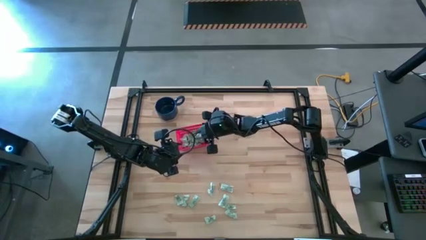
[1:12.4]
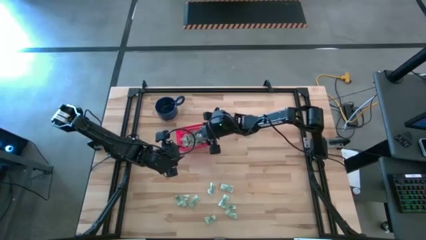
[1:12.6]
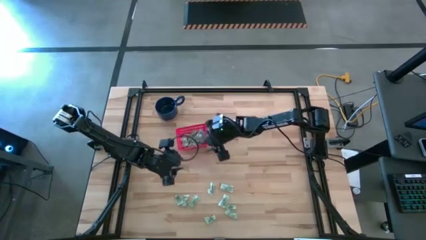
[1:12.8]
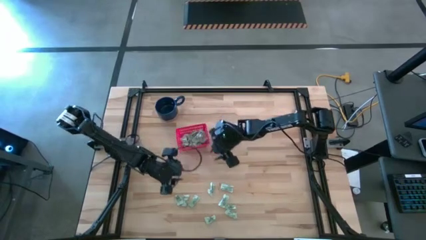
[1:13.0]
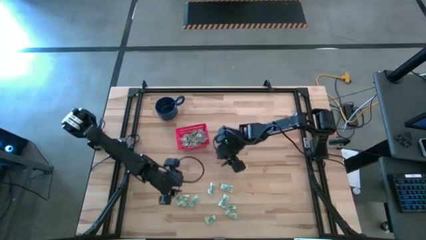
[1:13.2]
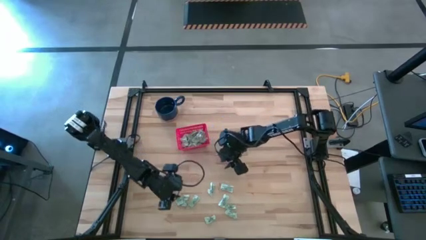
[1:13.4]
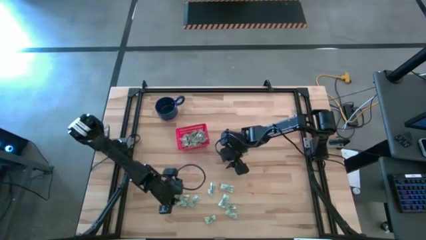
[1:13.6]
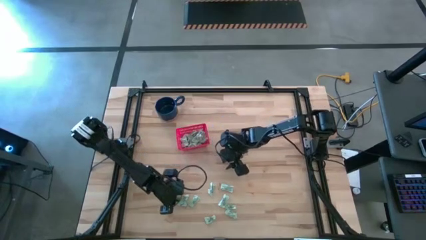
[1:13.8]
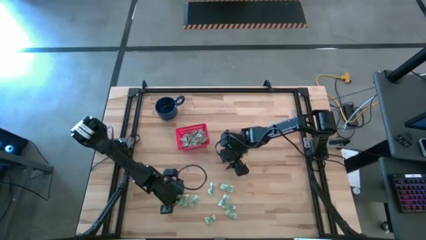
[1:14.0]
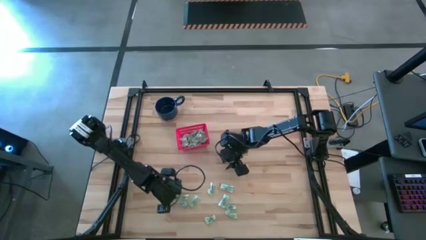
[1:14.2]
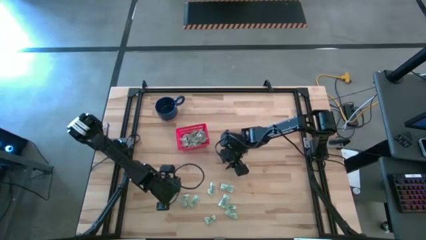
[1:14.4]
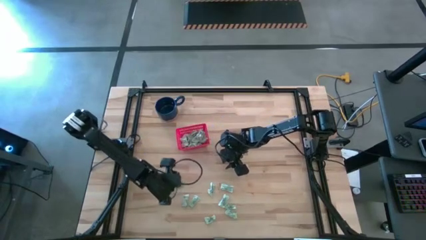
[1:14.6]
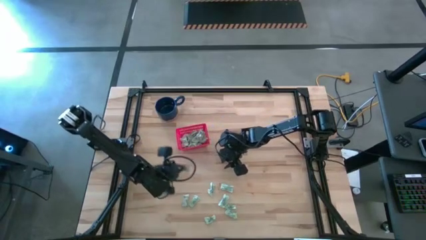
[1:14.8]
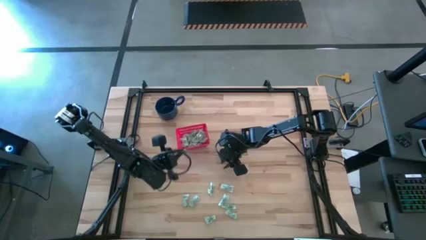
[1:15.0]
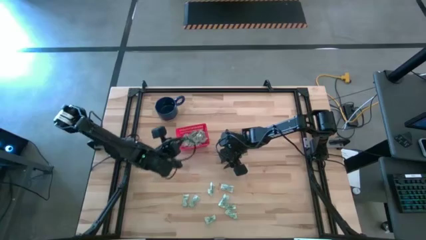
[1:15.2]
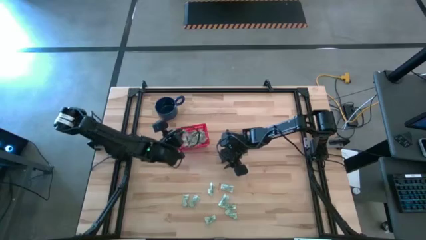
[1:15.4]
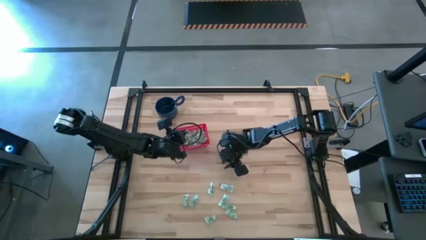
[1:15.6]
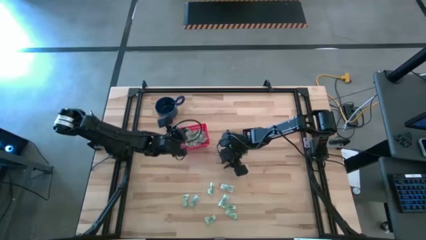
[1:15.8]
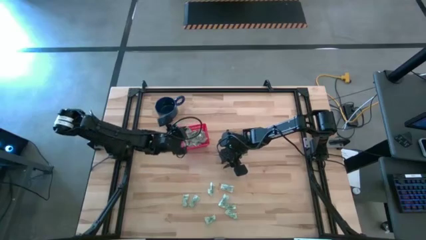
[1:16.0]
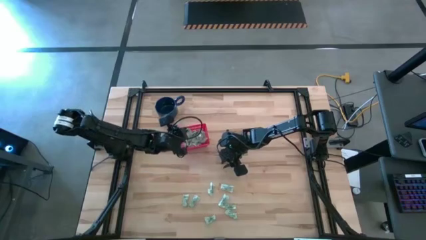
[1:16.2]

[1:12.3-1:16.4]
Task: Pick and place items into bin
Put the green stevia packet into the red bin

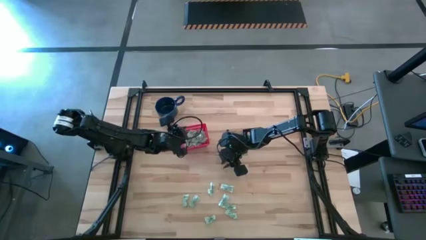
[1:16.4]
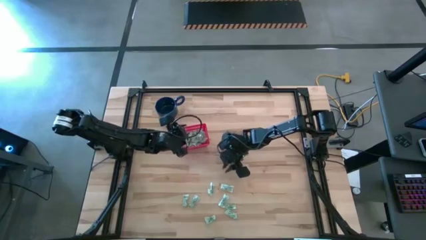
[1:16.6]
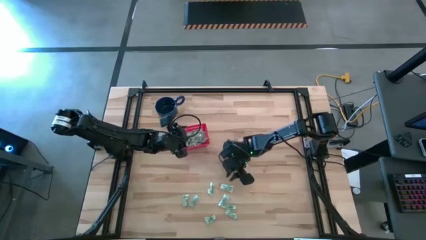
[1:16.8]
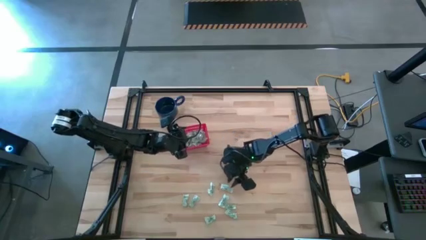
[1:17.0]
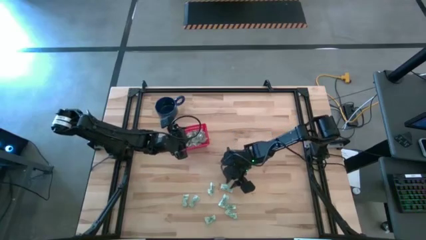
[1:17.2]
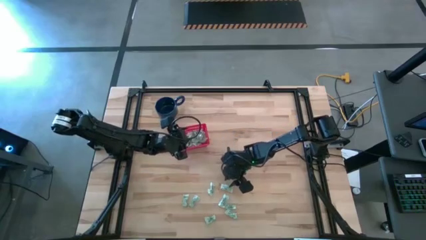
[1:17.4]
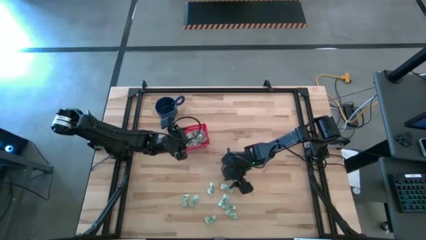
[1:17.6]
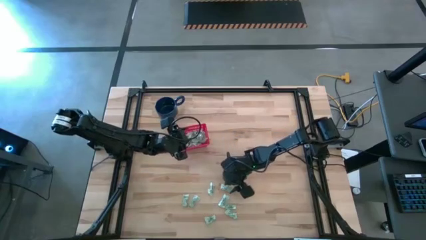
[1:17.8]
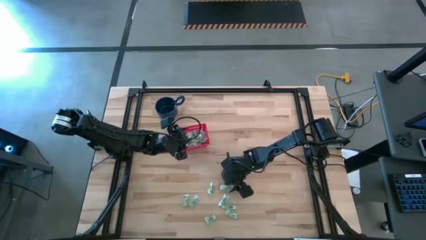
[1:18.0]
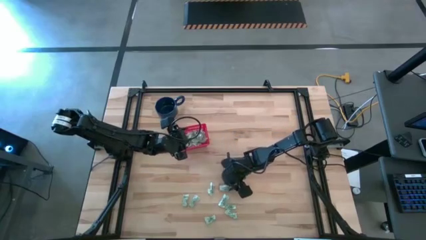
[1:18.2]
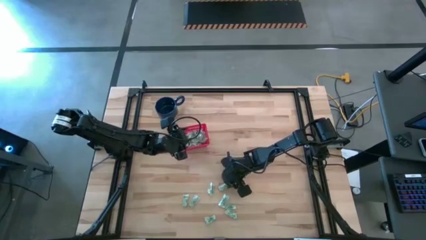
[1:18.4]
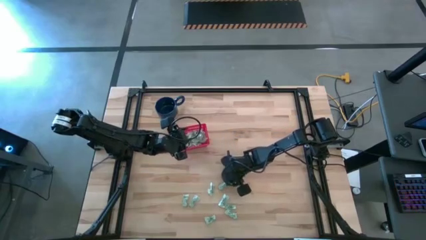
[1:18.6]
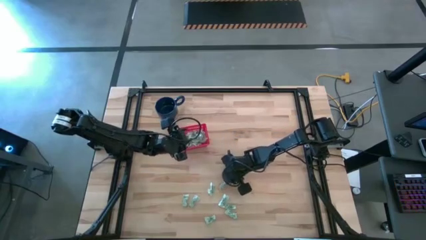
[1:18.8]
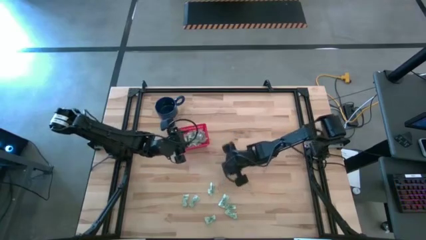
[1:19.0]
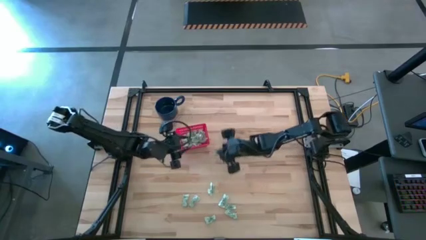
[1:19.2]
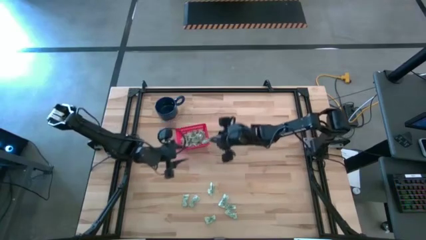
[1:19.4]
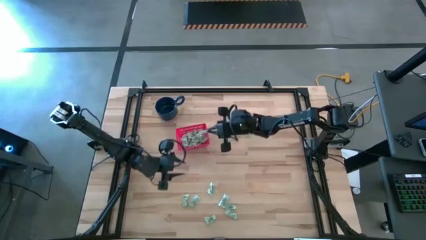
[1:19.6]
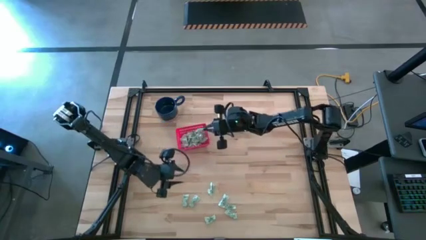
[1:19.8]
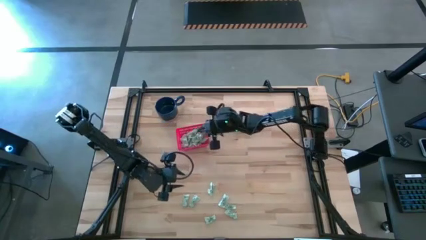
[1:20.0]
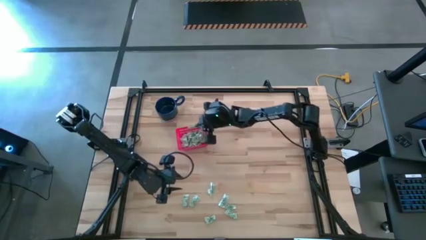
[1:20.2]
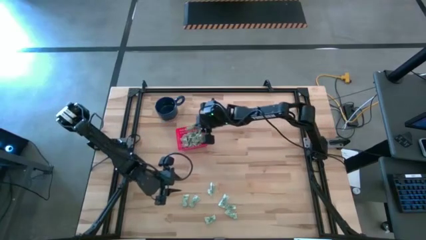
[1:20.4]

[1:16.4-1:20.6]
Put the green stevia packet into the red bin

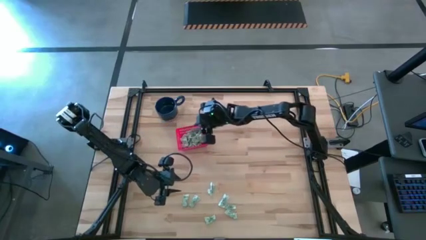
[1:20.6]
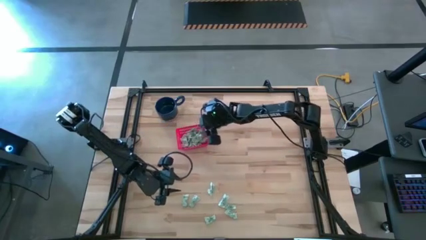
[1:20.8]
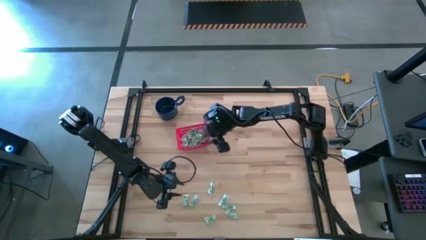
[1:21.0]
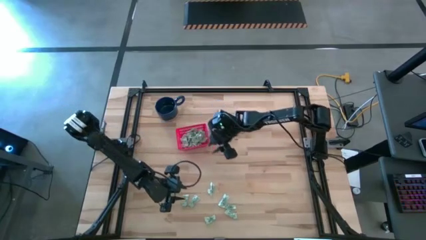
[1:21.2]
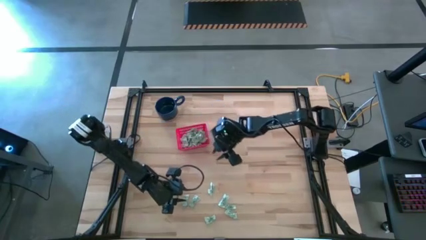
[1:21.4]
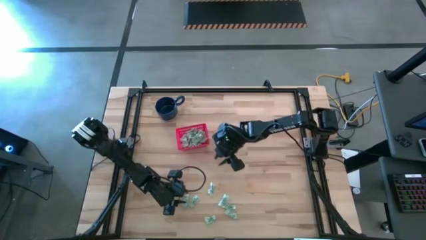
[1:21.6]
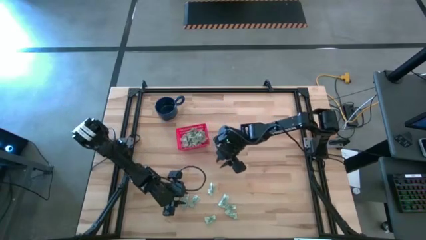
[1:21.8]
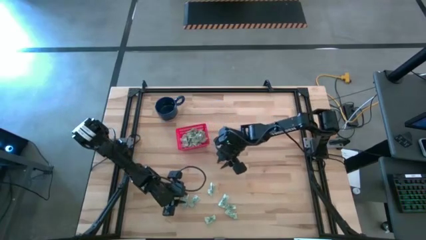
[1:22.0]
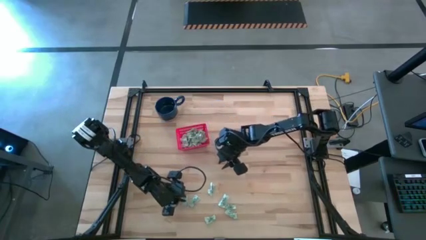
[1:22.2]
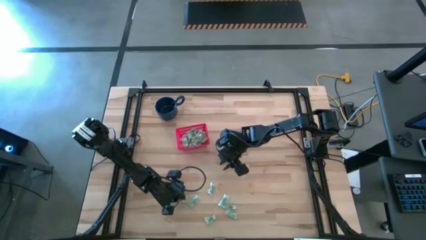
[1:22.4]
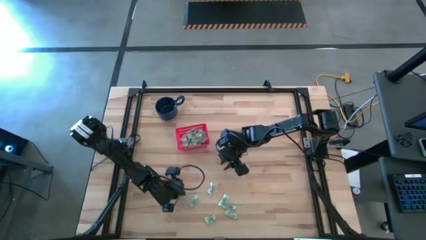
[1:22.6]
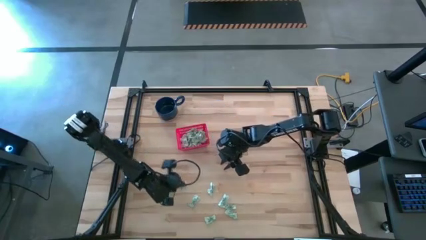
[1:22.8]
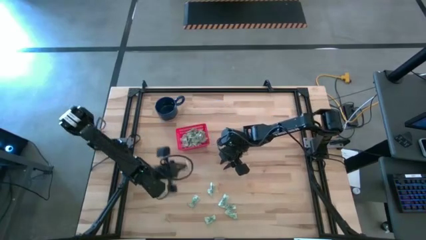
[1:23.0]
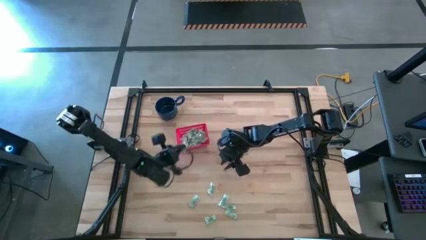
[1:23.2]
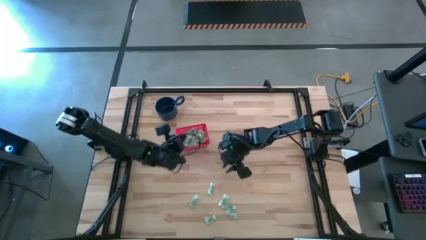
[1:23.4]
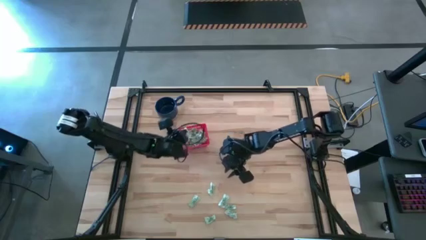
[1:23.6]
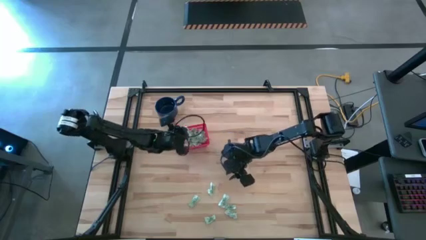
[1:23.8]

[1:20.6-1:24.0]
Put the green stevia packet into the red bin

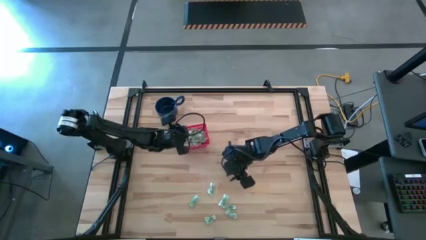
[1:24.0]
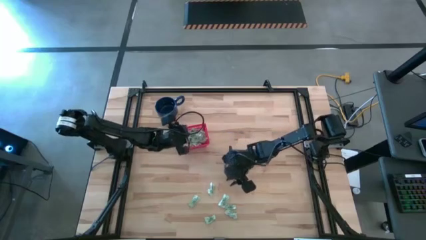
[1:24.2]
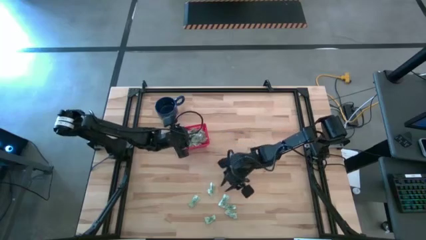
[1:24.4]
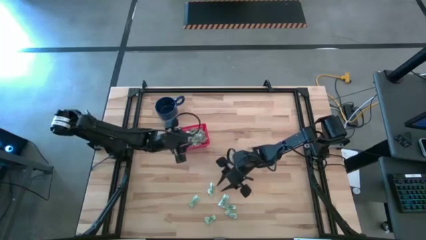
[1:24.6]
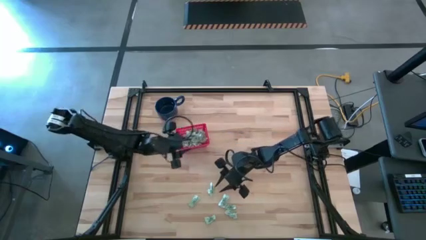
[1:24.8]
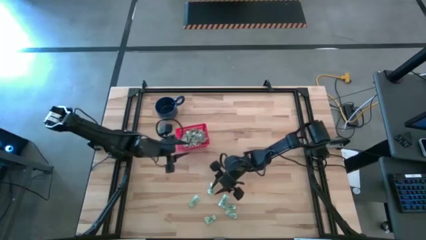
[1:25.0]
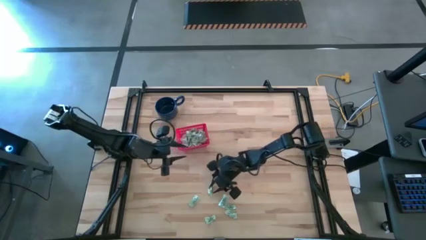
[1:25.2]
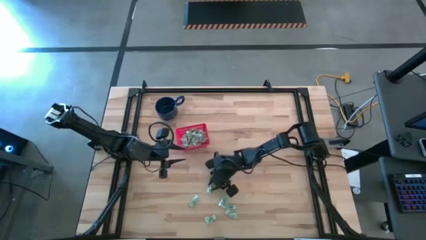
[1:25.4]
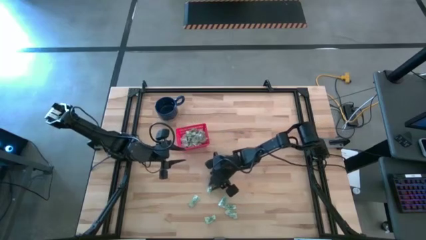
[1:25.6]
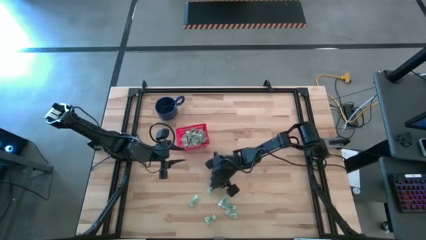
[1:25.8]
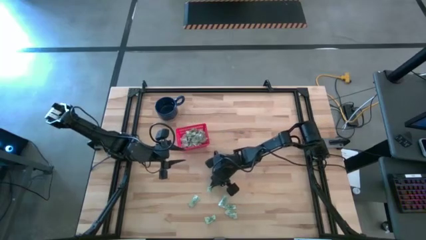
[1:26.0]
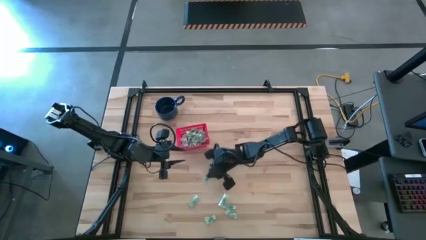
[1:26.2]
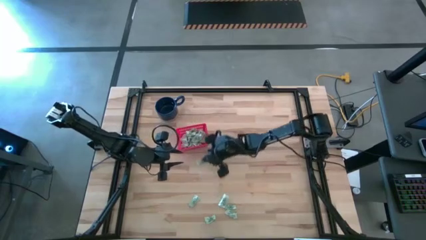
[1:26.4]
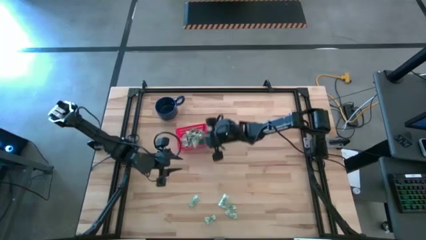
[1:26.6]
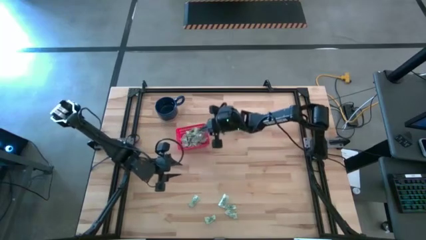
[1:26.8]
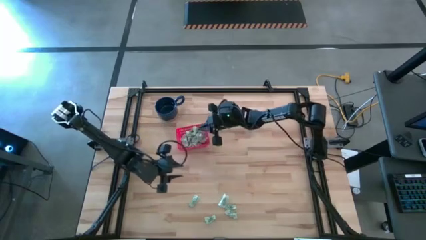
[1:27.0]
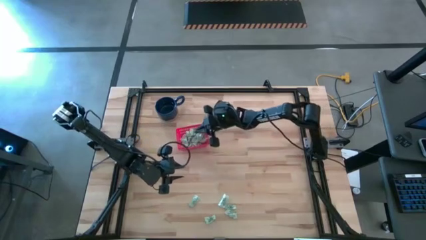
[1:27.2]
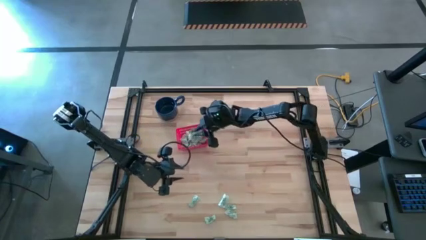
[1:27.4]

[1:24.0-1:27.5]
Put the green stevia packet into the red bin

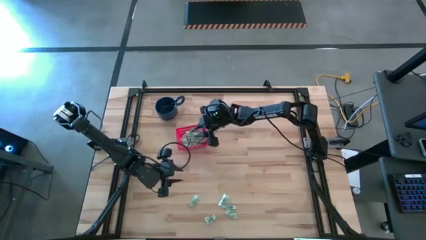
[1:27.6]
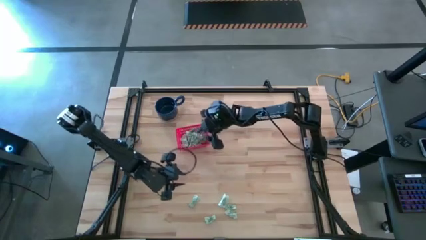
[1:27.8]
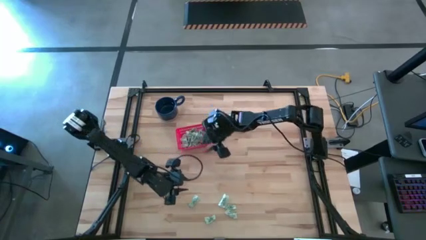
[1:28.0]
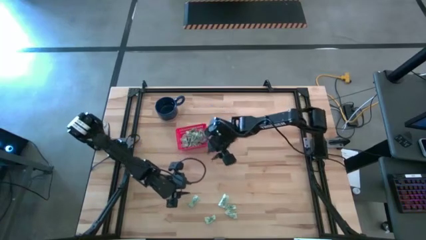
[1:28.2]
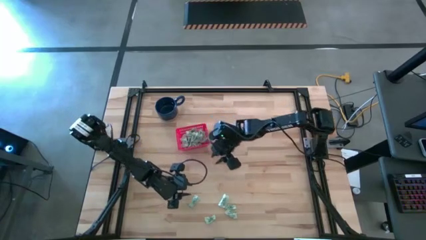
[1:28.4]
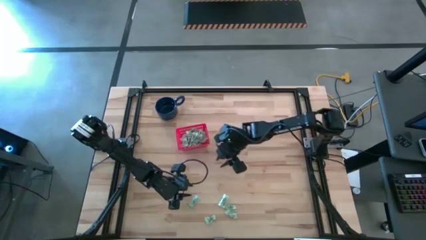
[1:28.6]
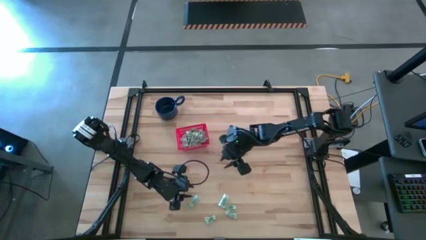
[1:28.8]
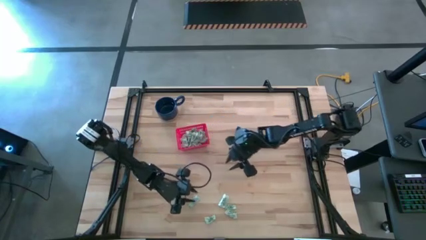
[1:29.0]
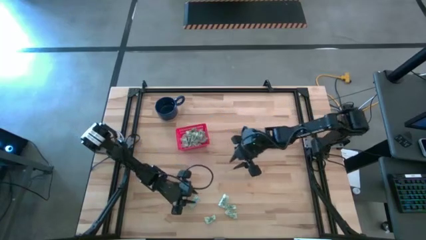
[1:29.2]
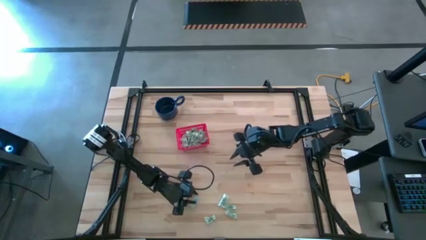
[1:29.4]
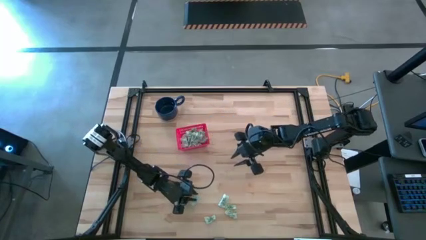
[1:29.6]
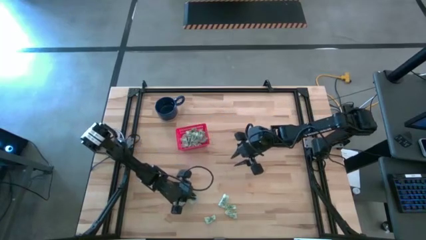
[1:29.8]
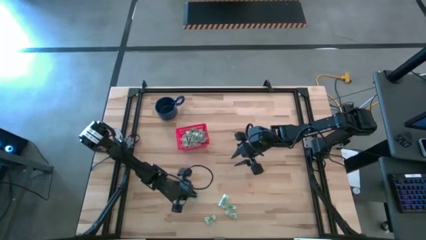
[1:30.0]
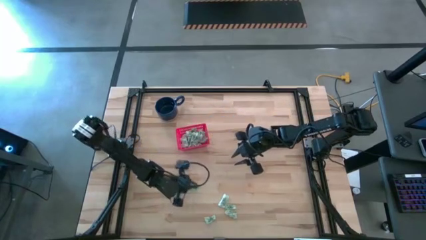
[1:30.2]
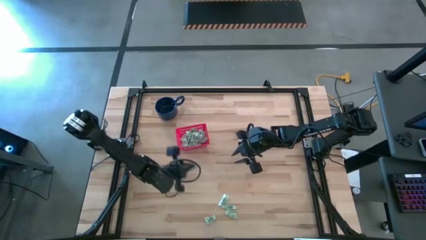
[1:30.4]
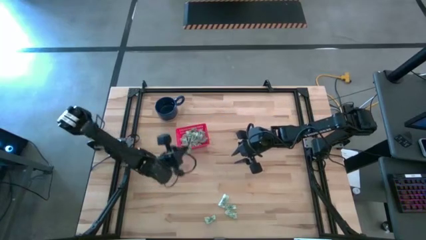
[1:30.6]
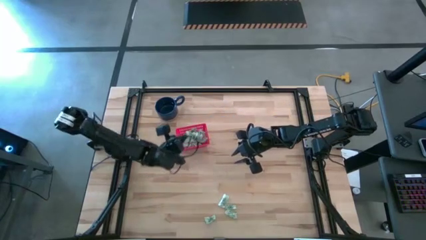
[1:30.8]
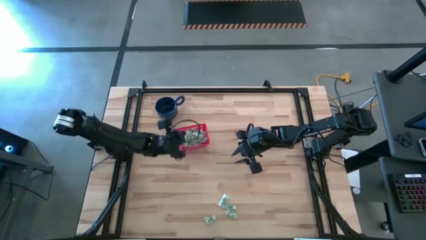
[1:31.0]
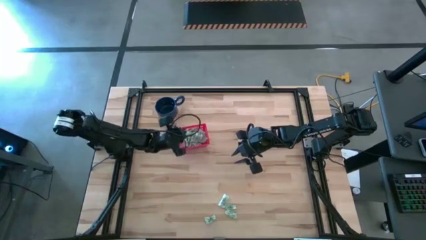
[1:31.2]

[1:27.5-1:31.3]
Put the green stevia packet into the red bin
